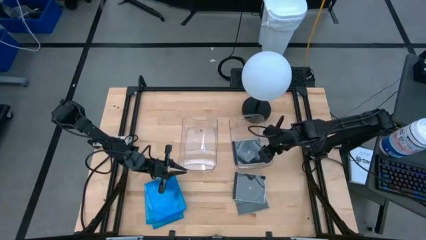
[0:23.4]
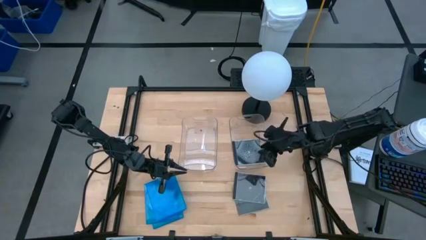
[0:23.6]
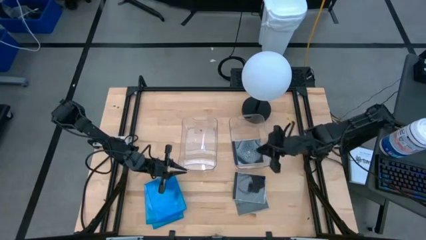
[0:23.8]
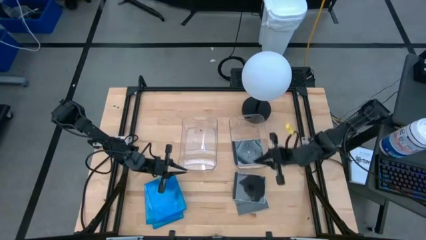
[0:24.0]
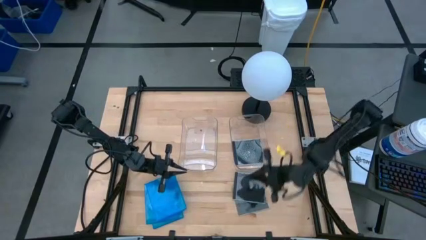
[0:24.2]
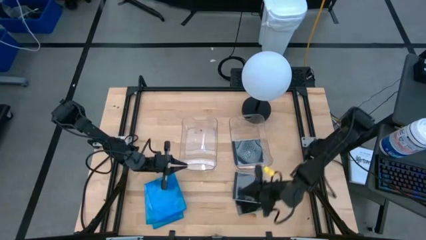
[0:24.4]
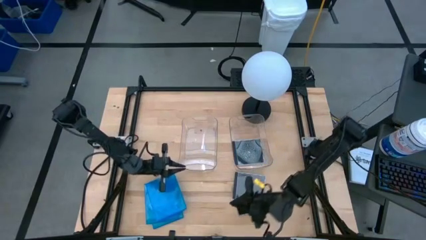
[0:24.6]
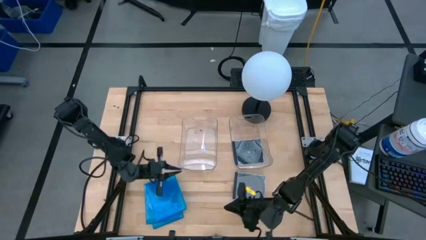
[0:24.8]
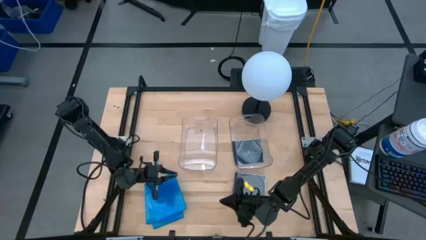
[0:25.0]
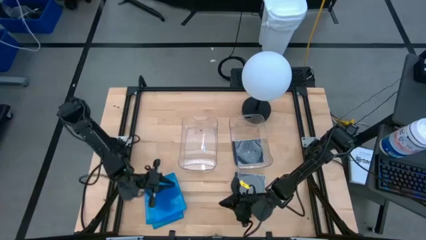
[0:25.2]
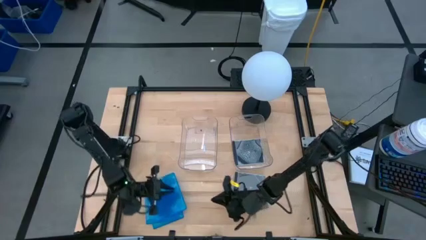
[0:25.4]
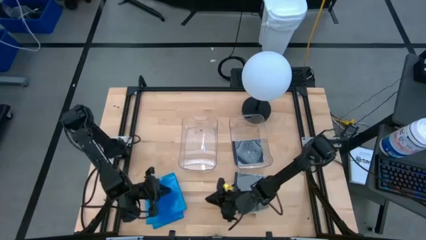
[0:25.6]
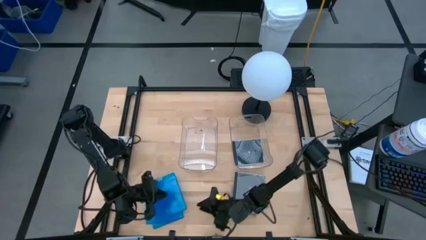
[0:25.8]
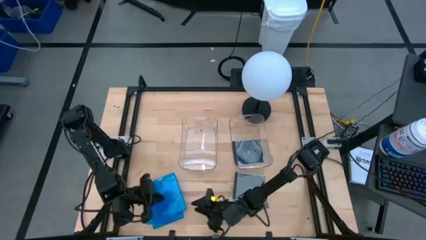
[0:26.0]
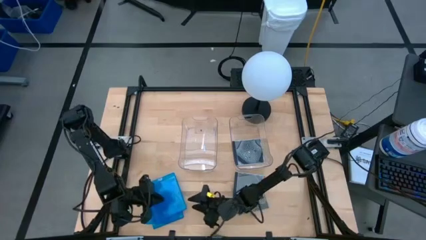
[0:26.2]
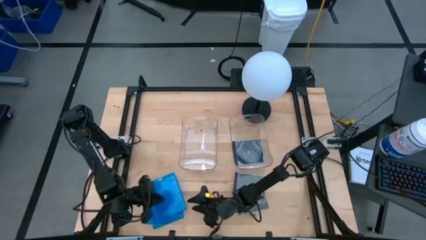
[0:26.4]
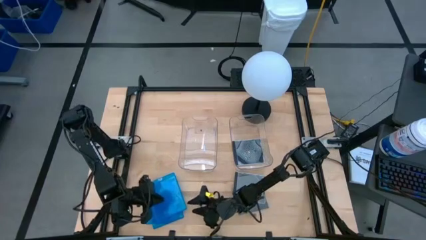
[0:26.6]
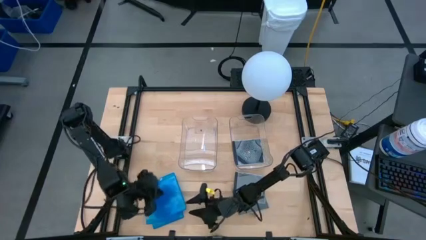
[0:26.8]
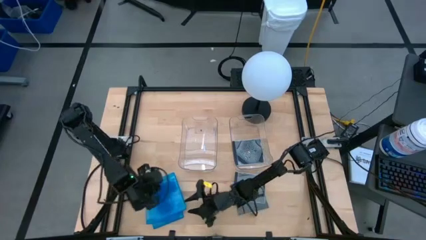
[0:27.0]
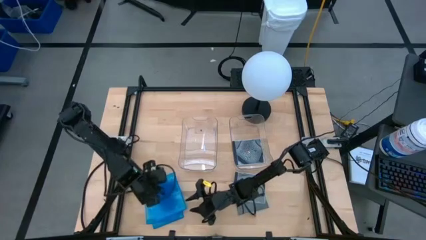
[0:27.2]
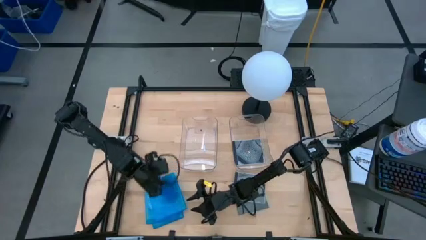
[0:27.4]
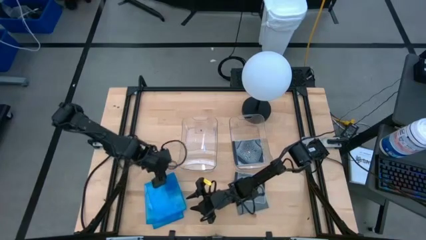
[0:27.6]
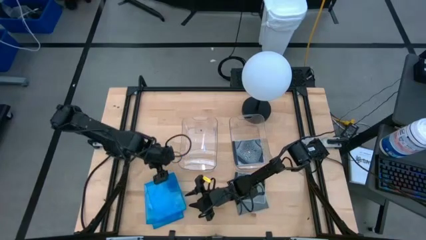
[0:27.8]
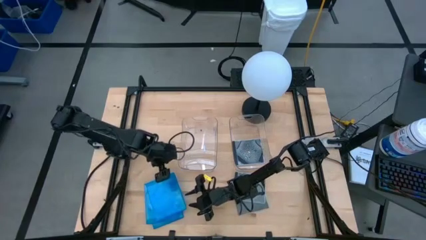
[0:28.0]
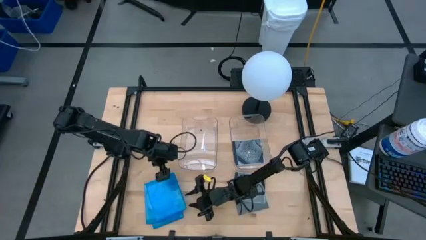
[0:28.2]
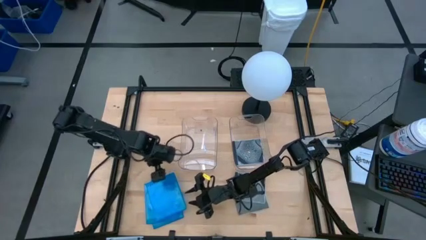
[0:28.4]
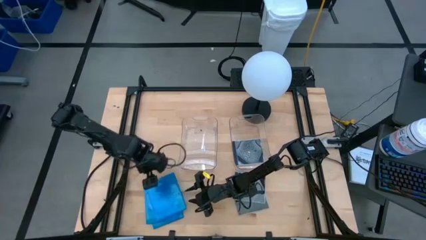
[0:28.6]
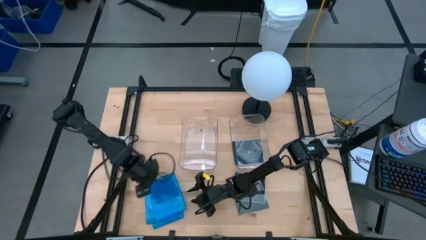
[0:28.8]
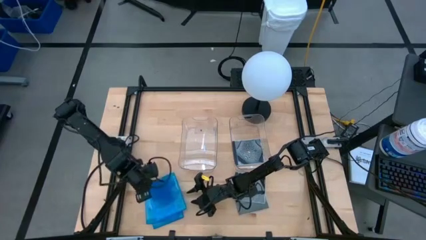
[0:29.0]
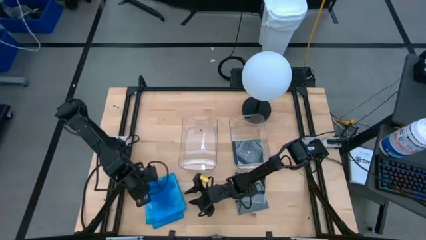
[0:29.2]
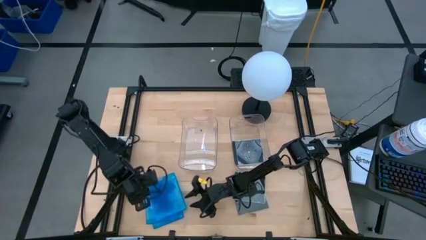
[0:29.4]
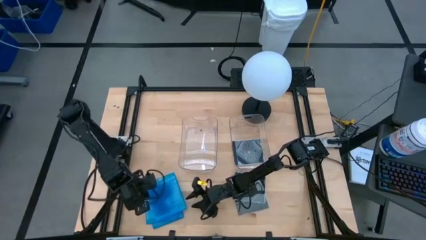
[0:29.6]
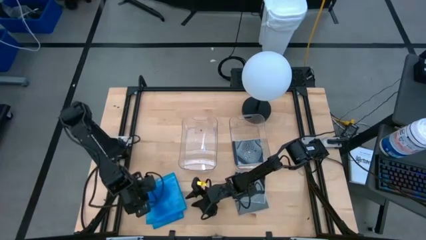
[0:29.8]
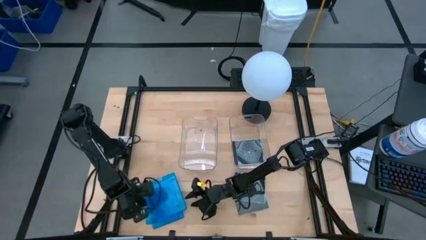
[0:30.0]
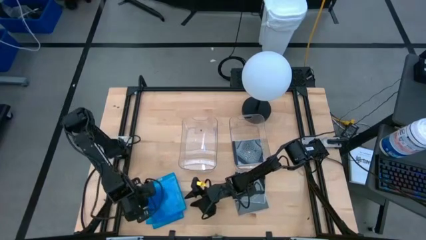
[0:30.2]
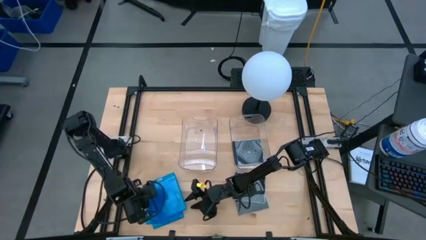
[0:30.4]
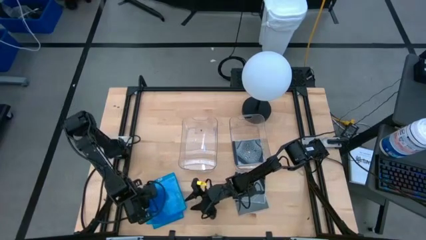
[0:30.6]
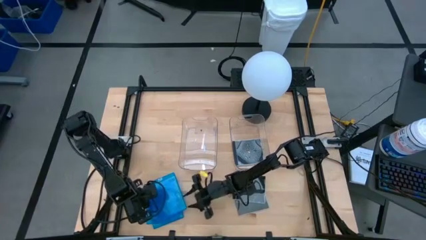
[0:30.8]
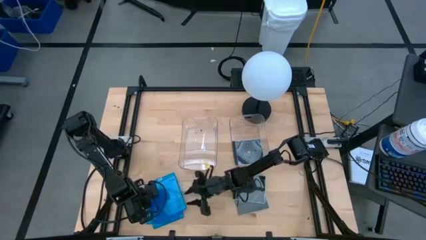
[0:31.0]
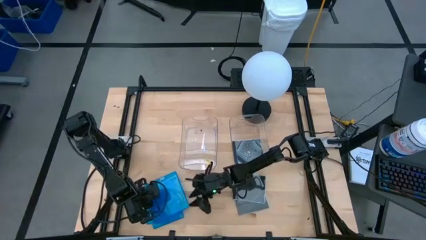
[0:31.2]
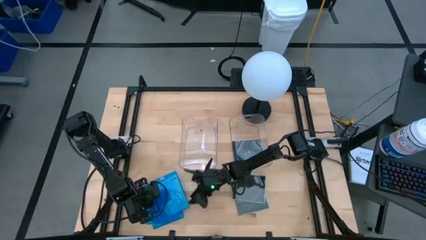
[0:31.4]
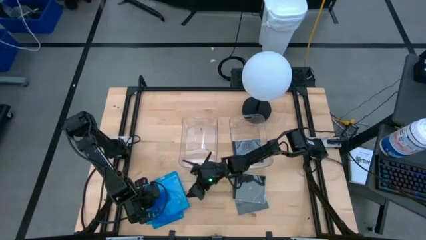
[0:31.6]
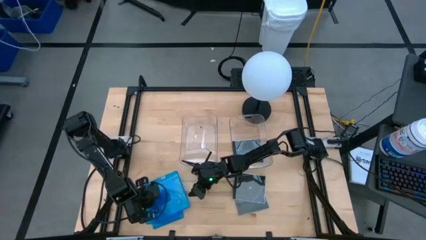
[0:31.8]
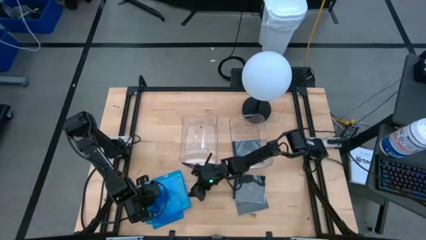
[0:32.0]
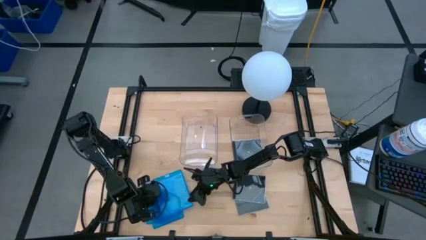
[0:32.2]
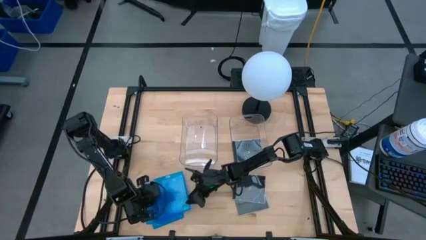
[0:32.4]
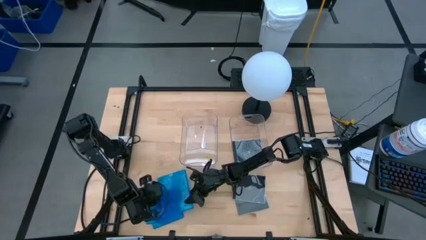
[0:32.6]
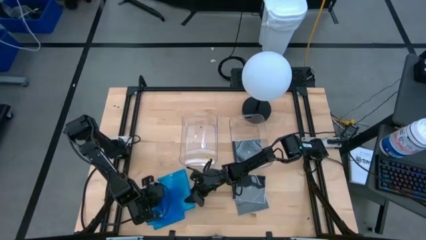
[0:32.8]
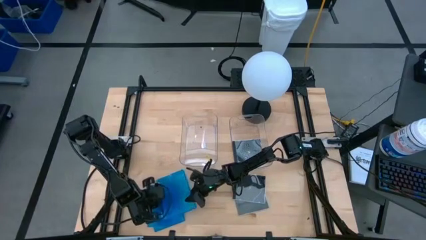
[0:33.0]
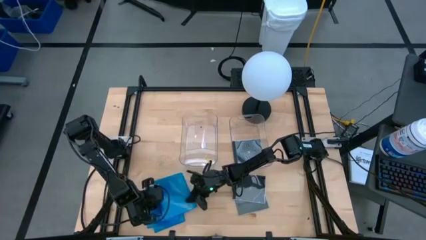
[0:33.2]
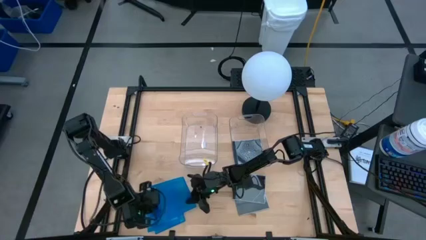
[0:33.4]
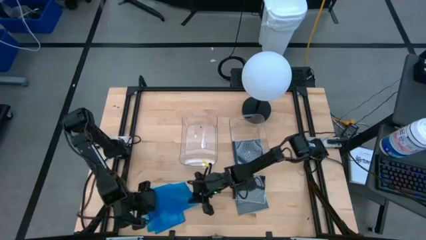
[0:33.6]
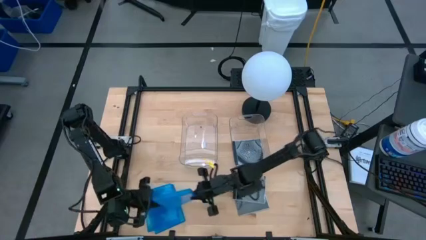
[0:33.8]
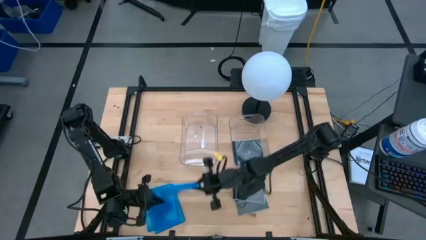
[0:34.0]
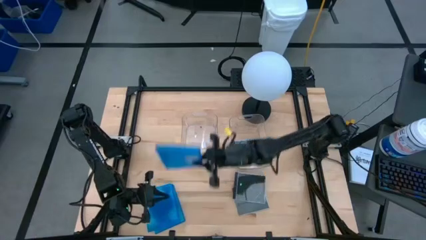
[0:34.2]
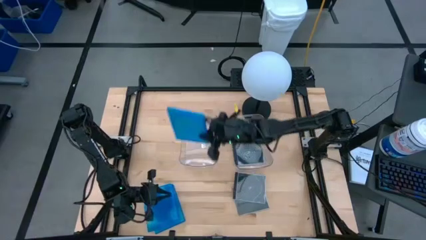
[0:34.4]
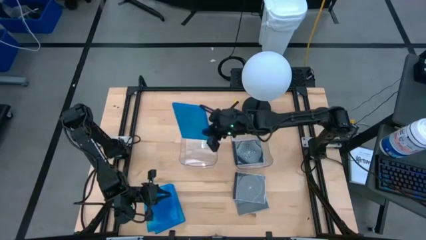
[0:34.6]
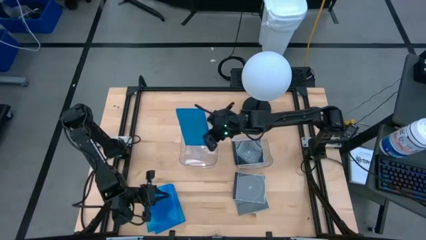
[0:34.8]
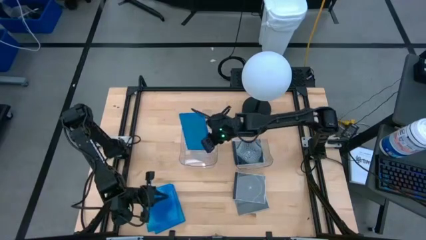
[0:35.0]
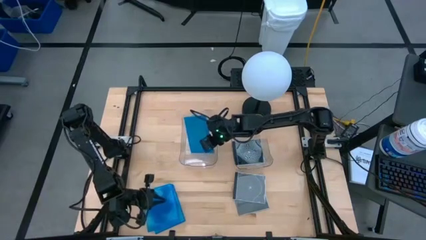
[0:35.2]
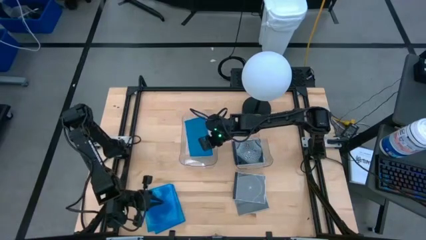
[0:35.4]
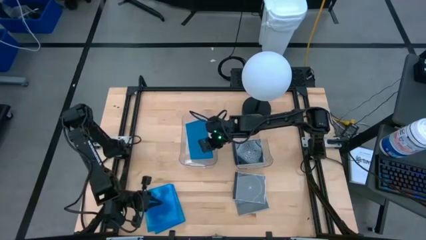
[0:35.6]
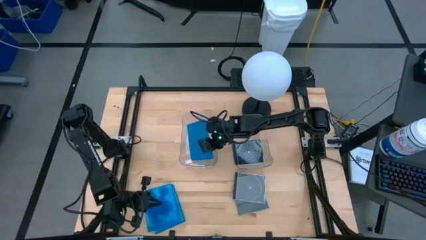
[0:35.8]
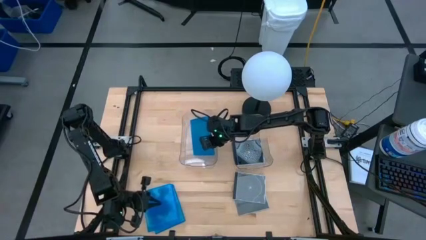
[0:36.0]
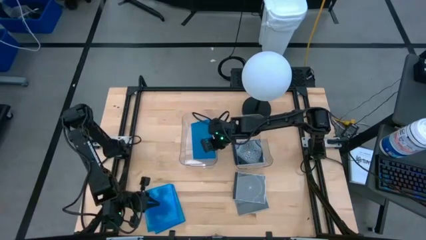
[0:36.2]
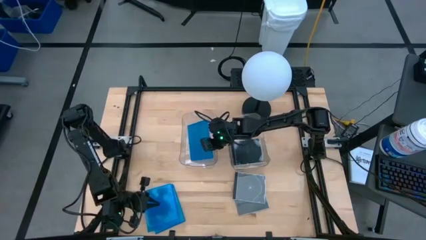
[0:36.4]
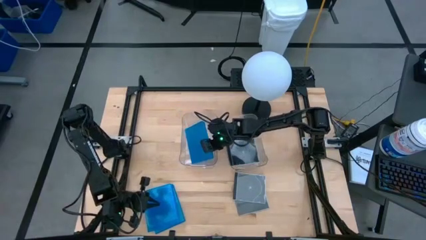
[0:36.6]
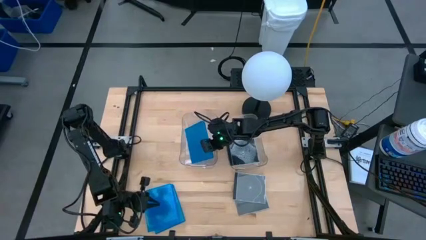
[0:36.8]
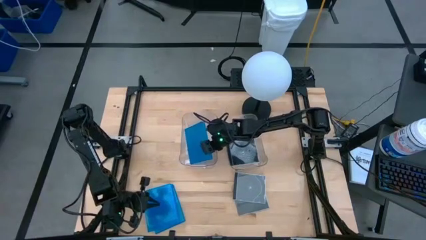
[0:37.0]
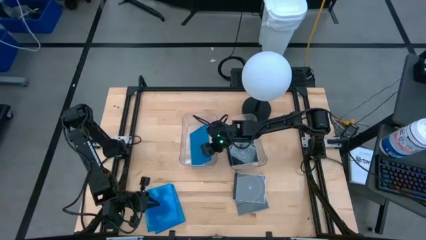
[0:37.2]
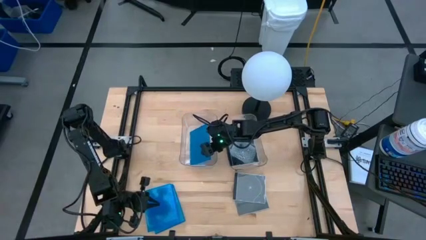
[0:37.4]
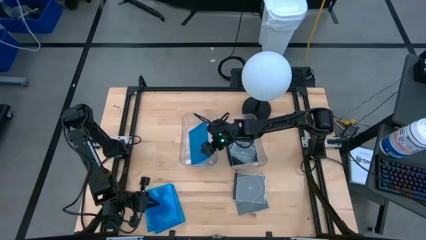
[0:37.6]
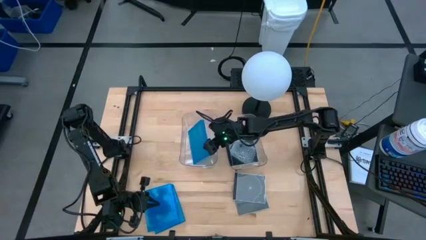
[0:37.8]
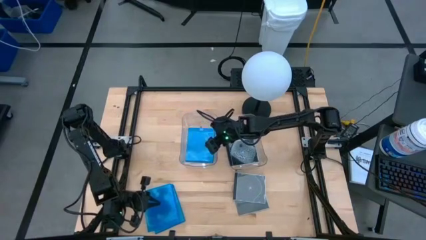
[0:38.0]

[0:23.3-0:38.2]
Task: Pick & place jewel cases by type
Put the blue cd case into the left transparent bin
